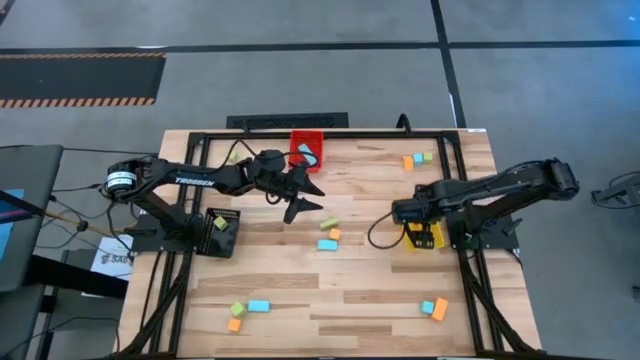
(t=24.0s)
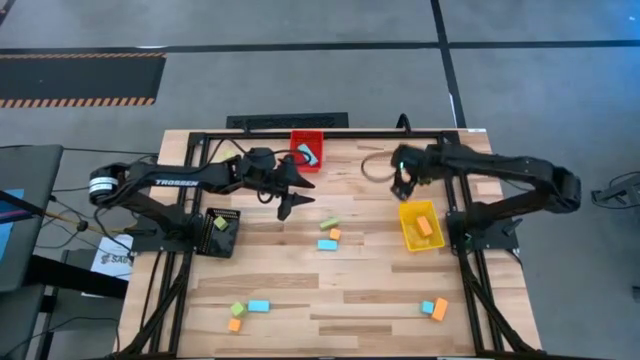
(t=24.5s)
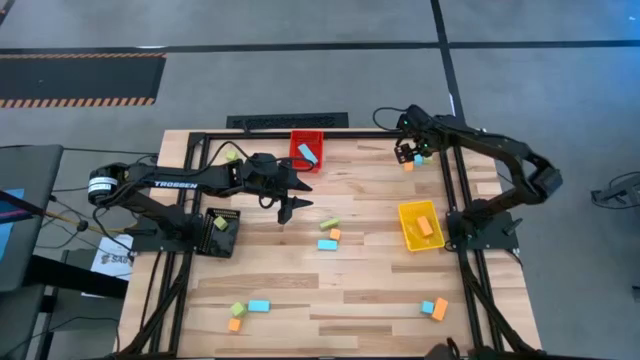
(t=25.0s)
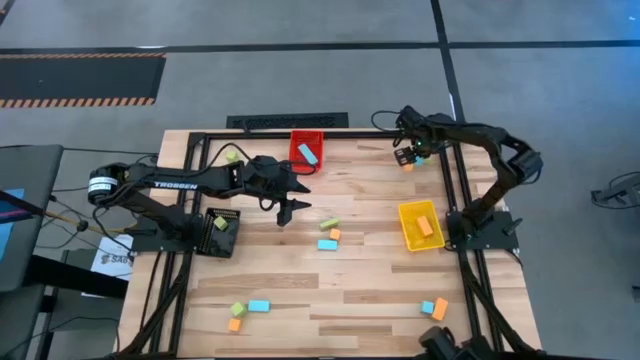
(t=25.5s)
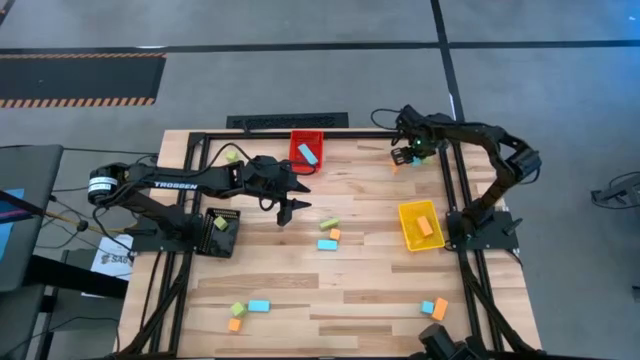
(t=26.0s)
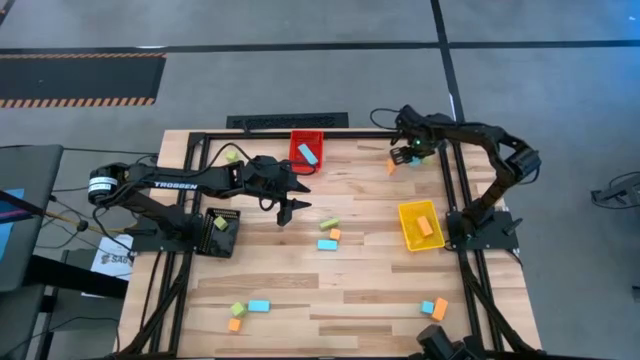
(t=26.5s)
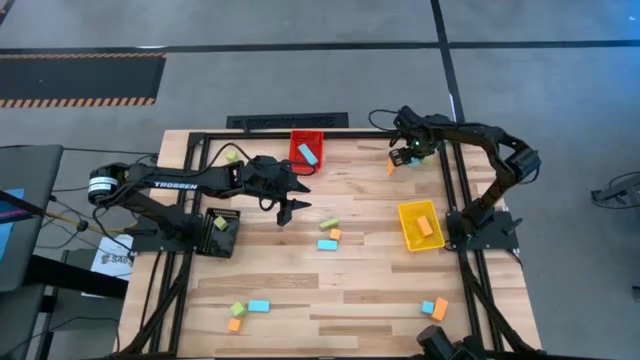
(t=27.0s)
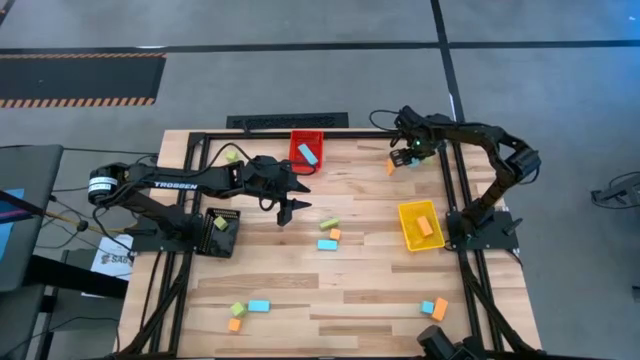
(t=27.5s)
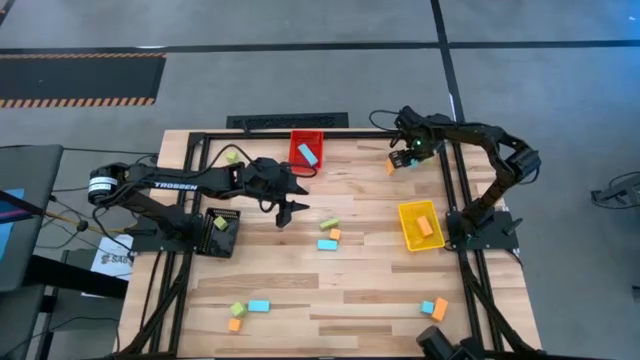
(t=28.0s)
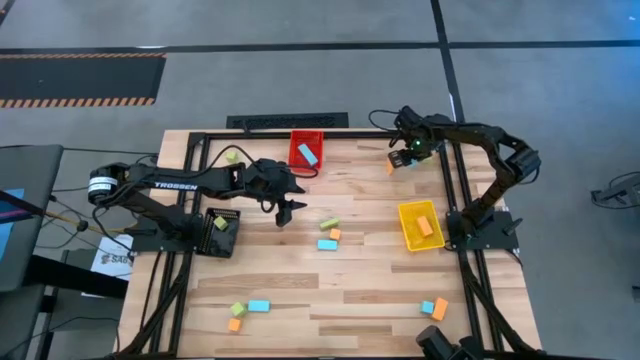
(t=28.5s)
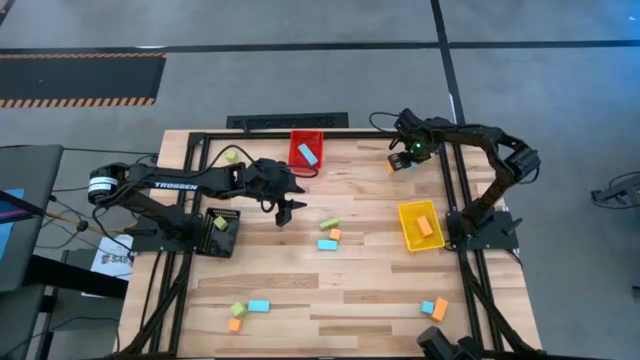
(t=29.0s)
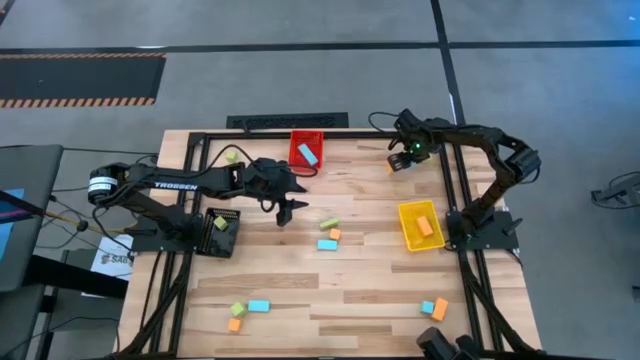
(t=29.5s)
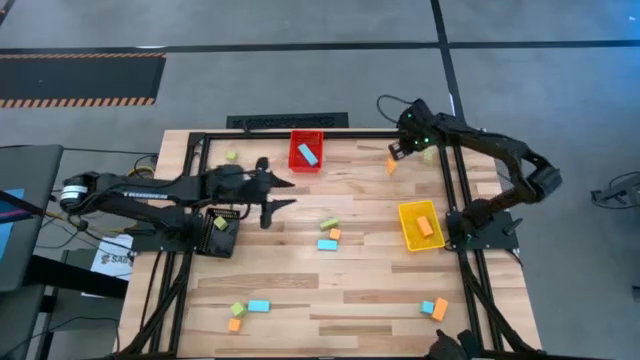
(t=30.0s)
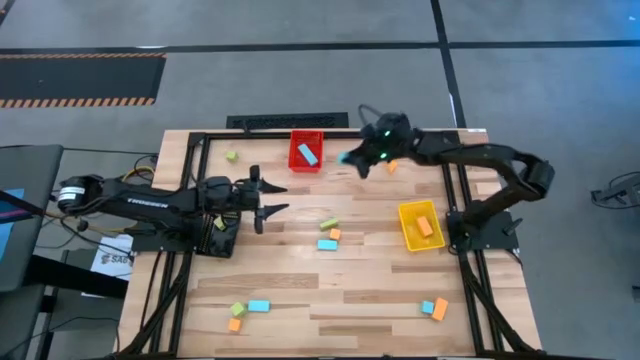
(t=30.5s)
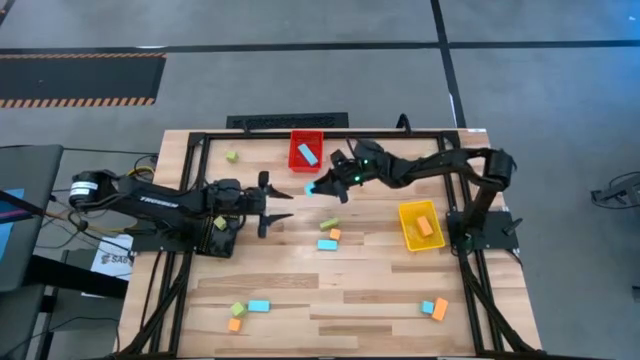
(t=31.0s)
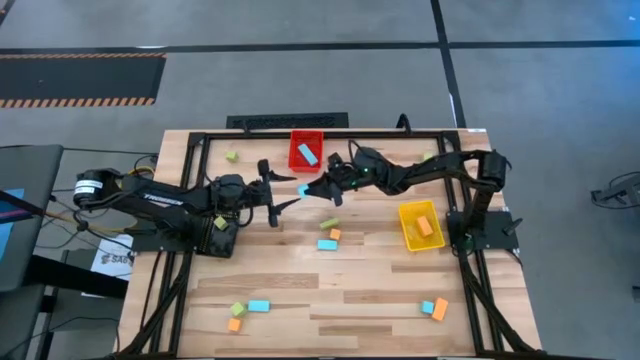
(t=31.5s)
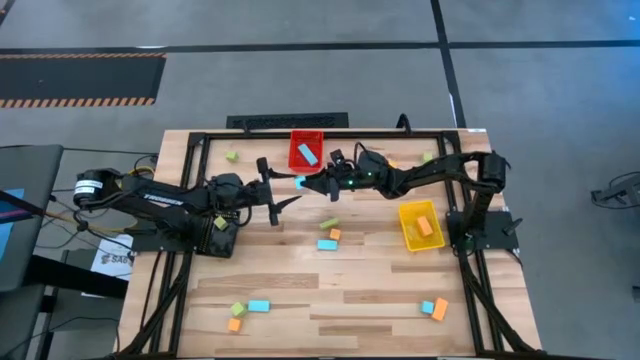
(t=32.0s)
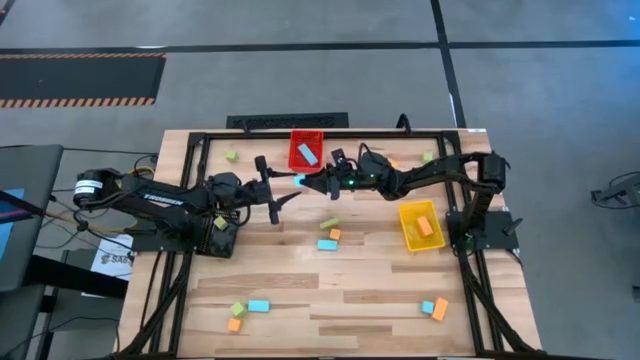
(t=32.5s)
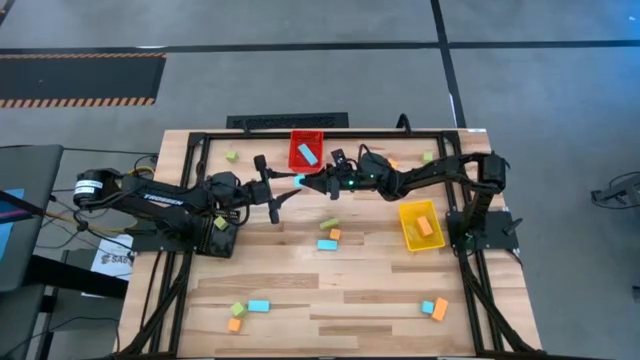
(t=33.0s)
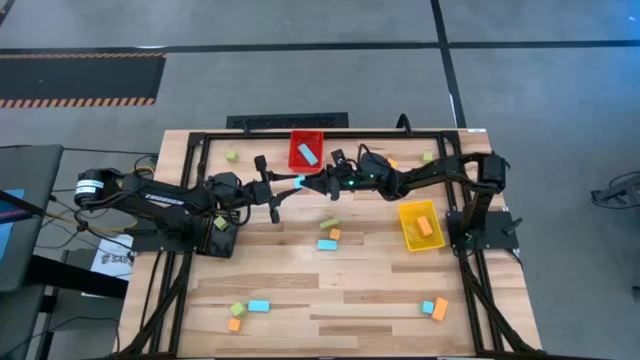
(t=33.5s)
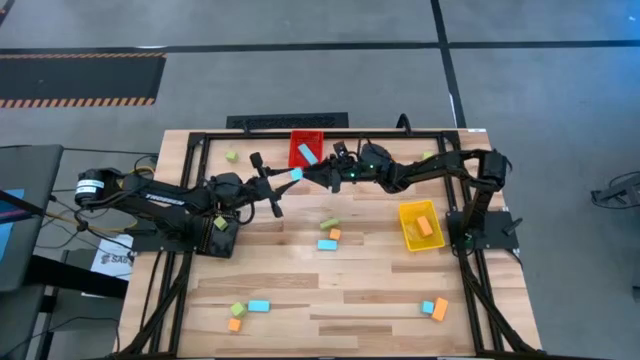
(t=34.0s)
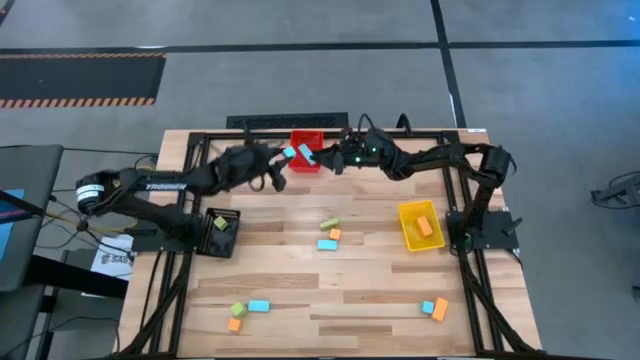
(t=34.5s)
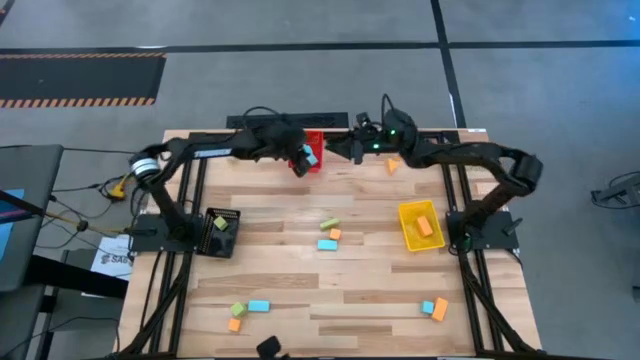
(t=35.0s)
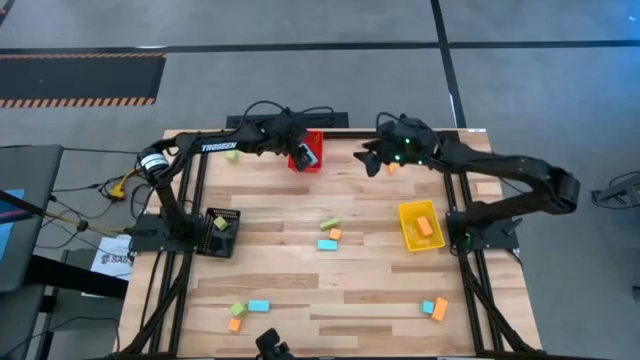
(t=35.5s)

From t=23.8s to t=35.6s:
Task: Sort & place blocks by color
Put the light blue block into the red bin

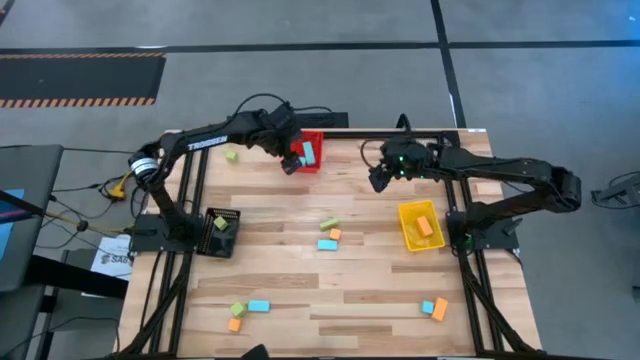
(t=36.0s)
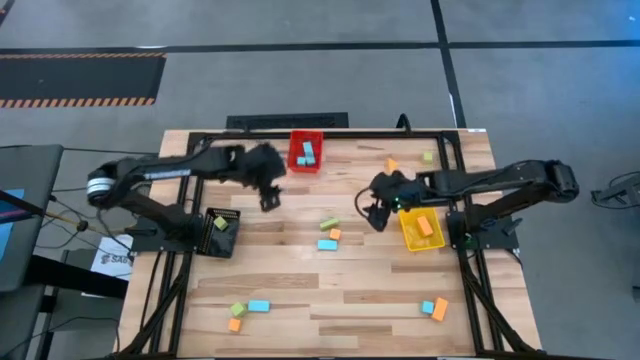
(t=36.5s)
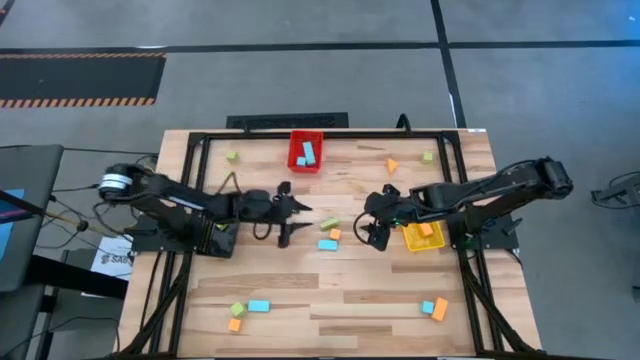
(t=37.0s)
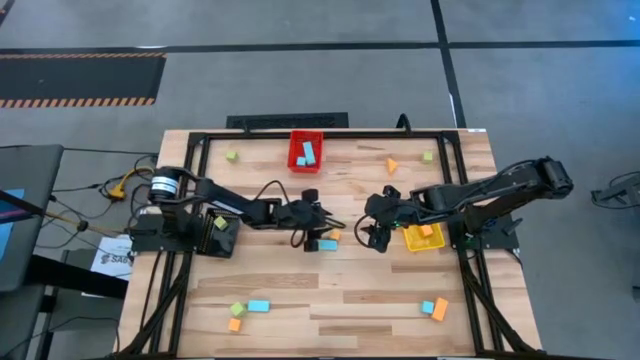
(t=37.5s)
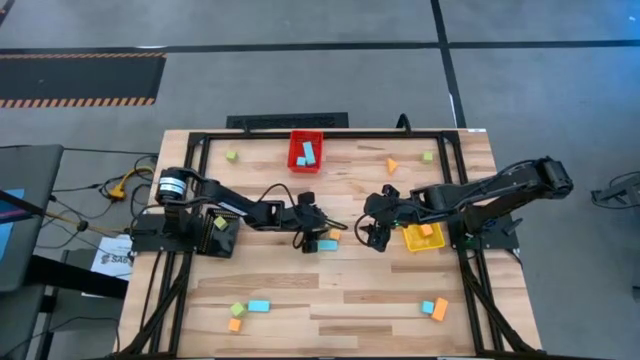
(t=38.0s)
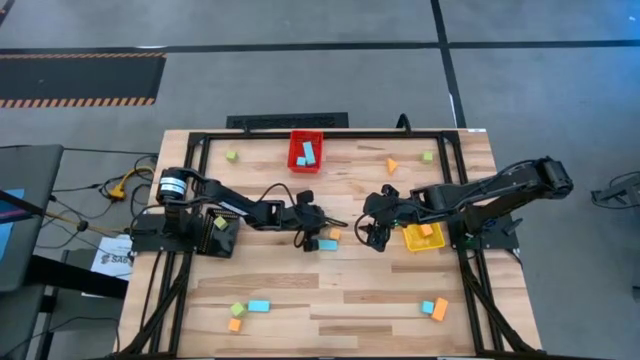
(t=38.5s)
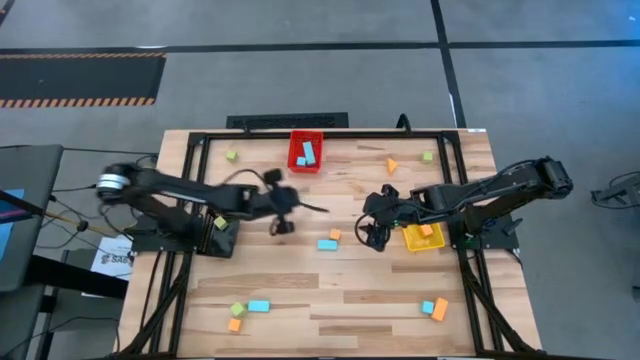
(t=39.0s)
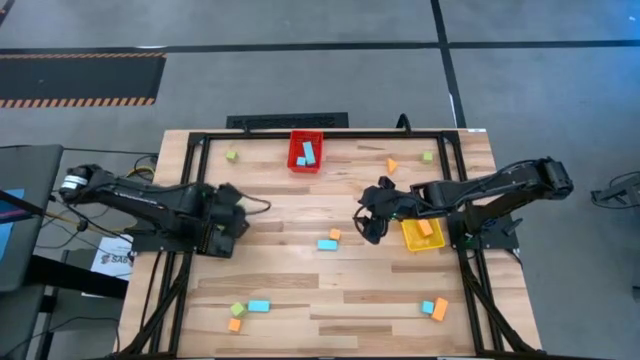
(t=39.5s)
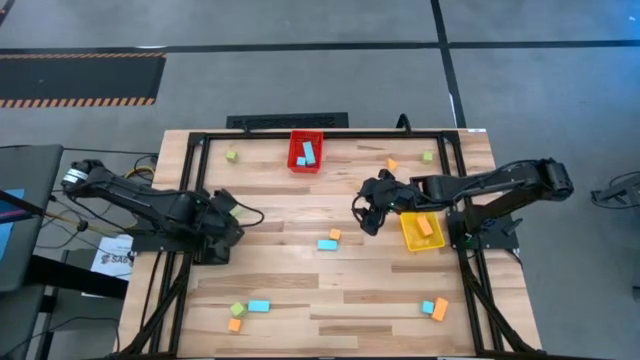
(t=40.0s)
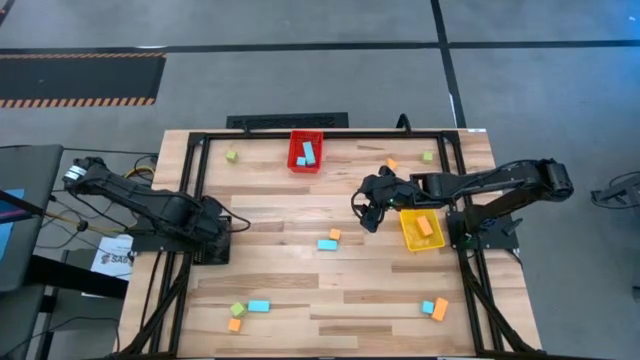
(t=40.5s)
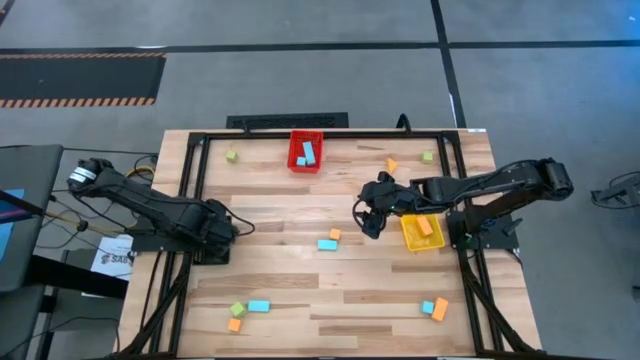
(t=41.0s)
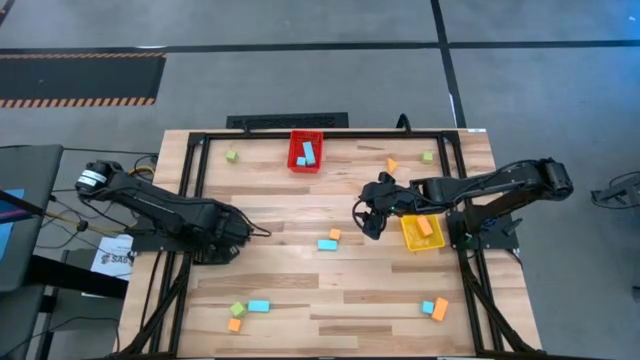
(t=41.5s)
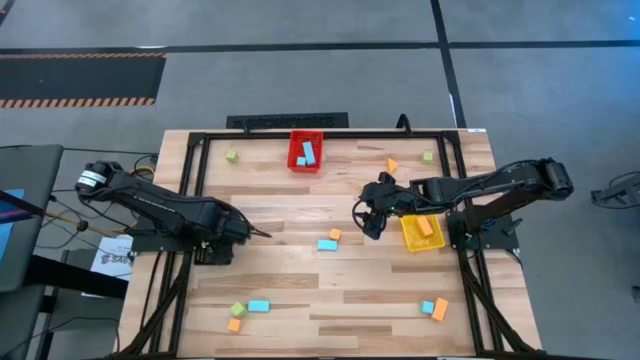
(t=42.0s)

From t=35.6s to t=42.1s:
Put the light green block into the black bin

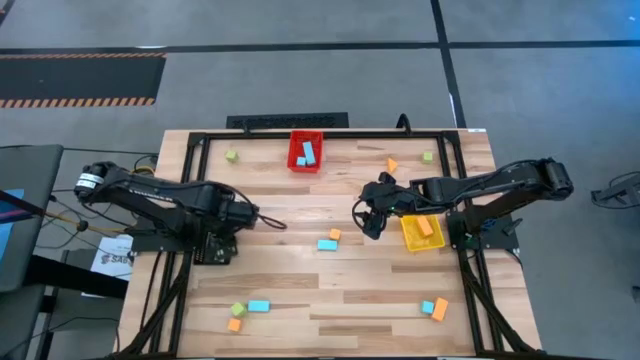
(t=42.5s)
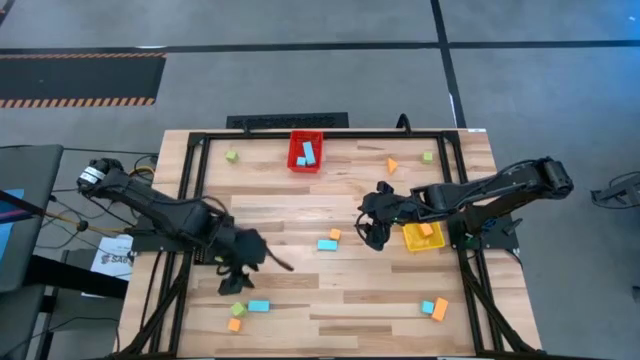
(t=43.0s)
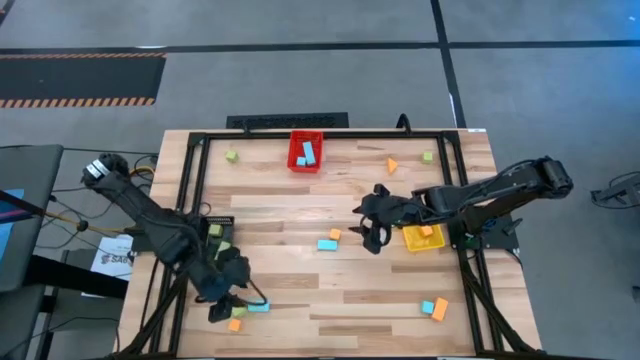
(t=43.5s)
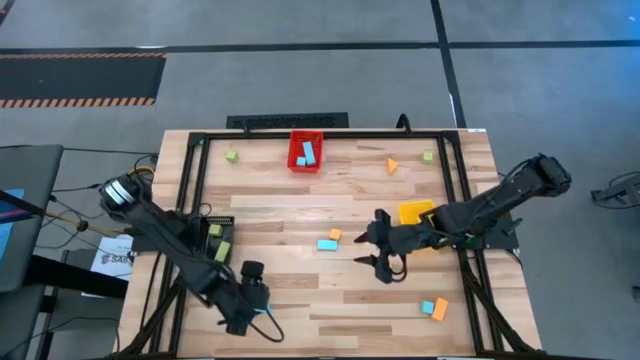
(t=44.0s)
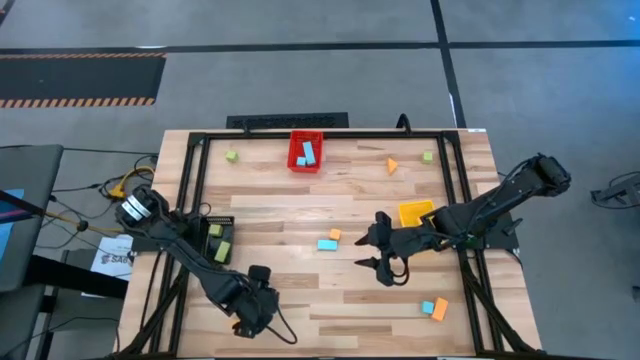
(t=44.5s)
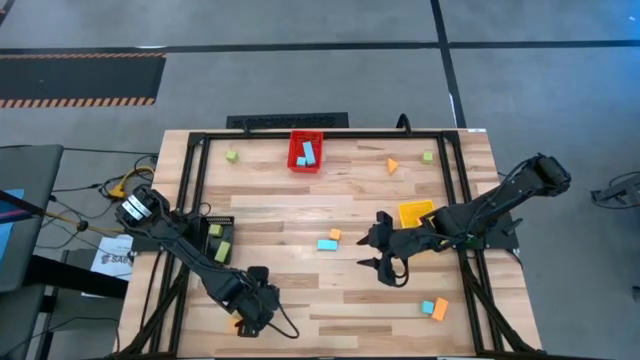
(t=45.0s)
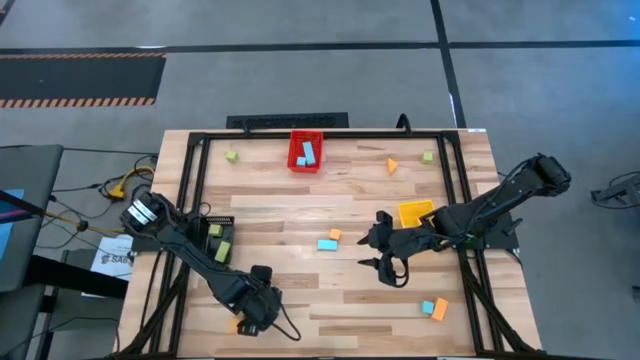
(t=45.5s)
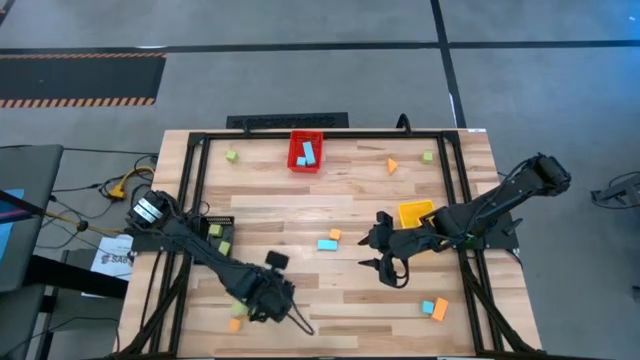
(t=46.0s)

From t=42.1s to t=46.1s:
Put the light blue block into the red bin
